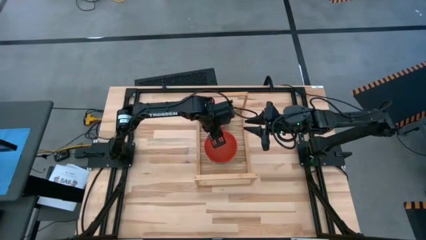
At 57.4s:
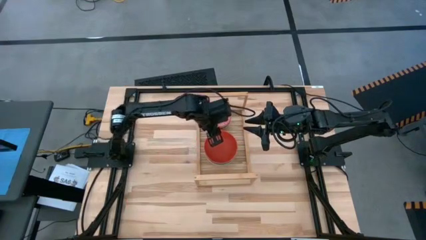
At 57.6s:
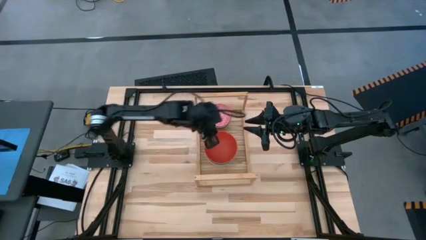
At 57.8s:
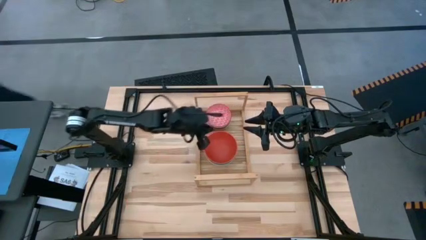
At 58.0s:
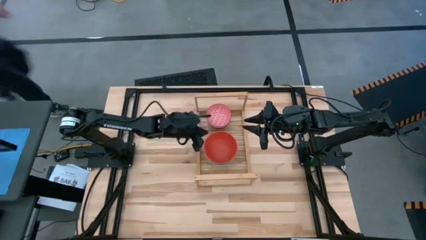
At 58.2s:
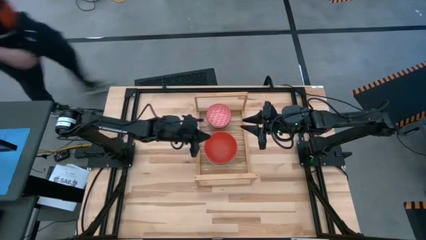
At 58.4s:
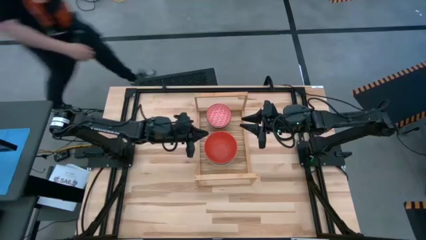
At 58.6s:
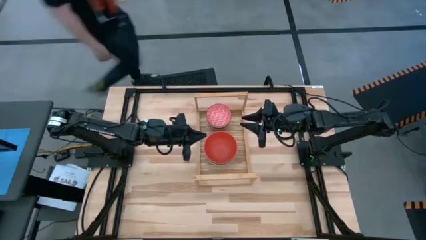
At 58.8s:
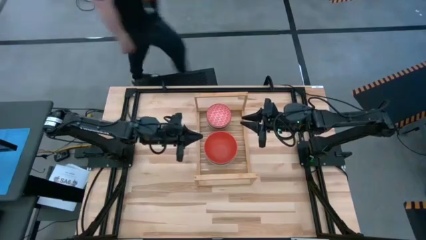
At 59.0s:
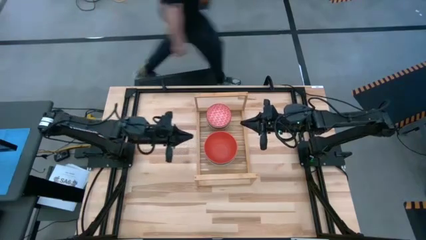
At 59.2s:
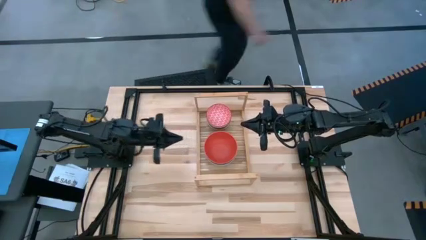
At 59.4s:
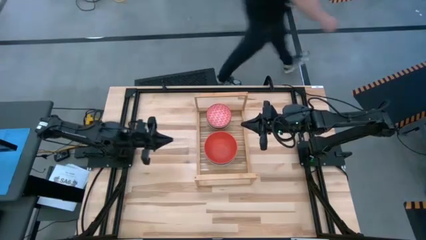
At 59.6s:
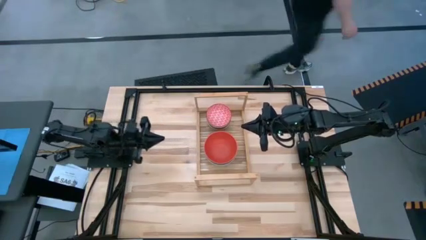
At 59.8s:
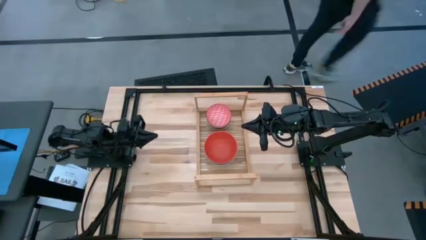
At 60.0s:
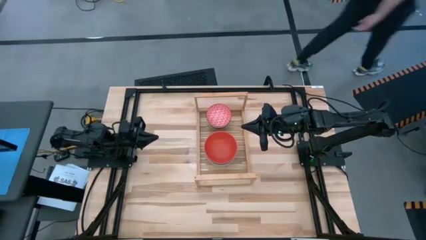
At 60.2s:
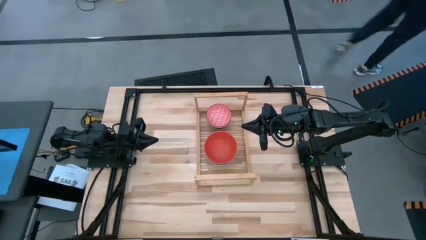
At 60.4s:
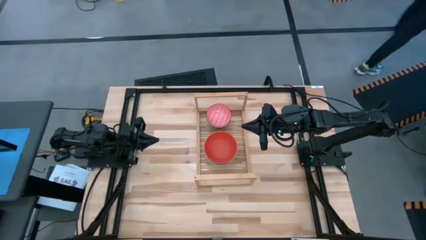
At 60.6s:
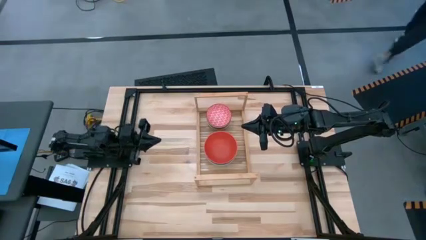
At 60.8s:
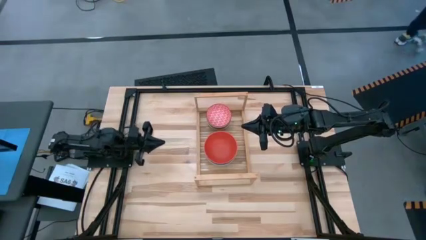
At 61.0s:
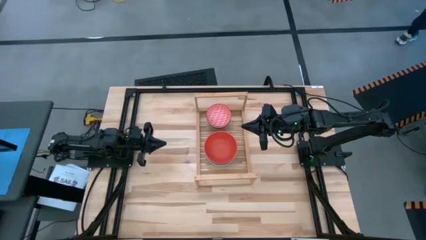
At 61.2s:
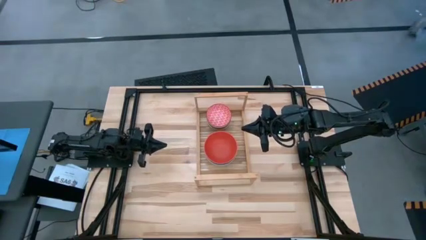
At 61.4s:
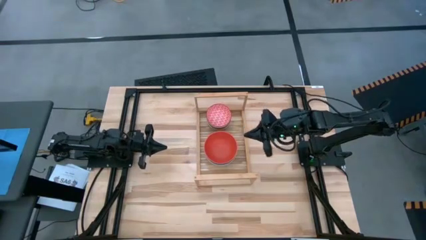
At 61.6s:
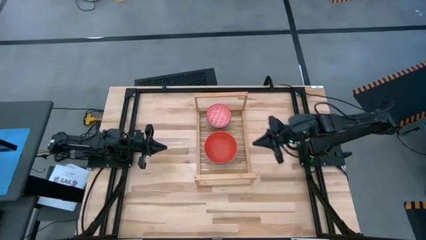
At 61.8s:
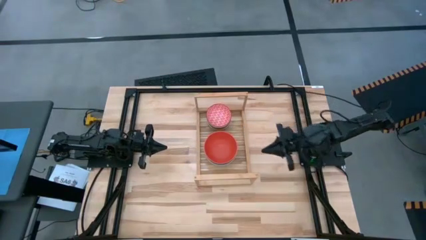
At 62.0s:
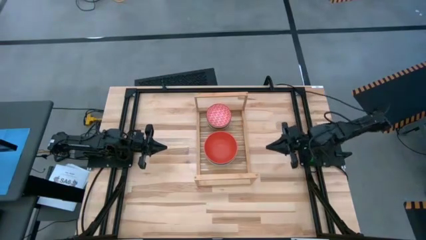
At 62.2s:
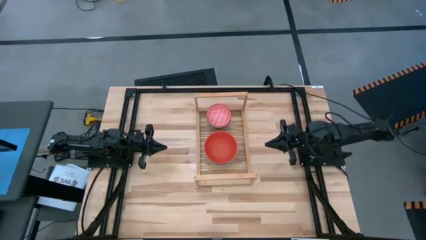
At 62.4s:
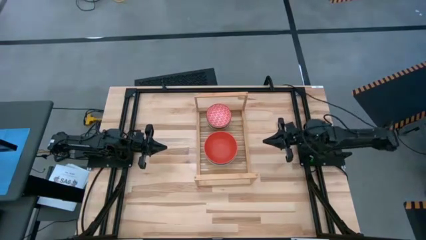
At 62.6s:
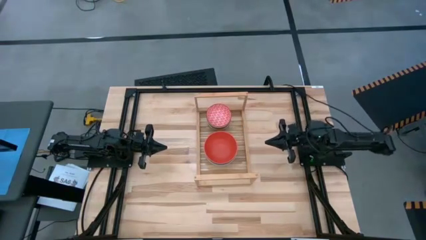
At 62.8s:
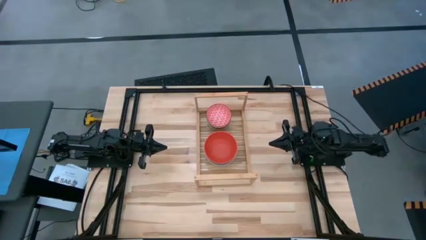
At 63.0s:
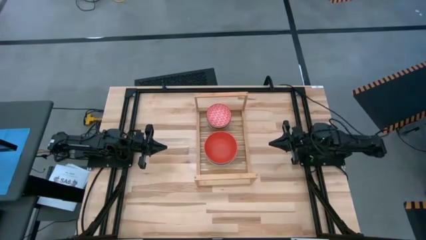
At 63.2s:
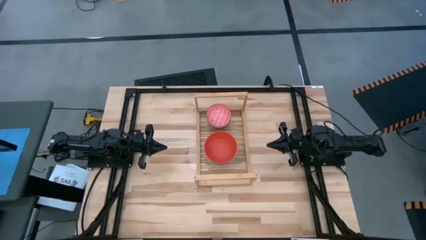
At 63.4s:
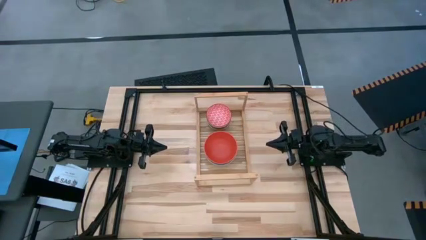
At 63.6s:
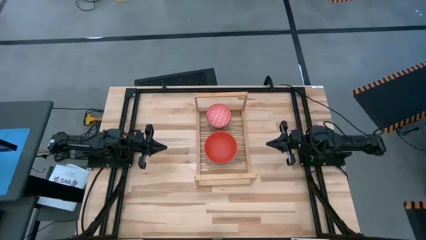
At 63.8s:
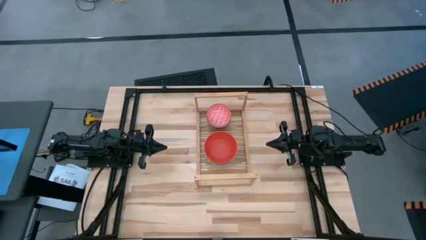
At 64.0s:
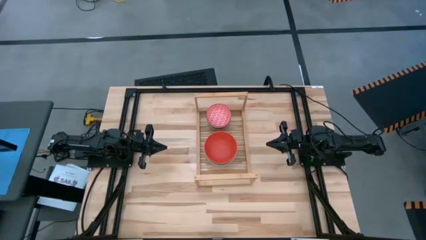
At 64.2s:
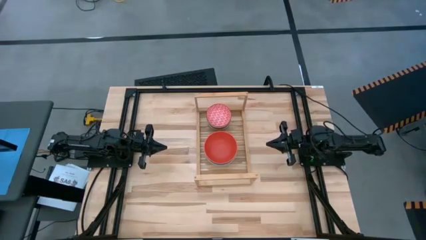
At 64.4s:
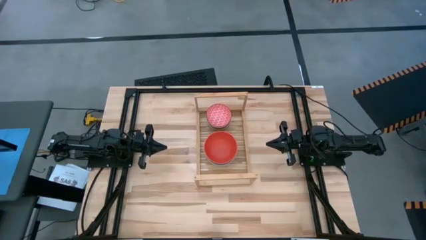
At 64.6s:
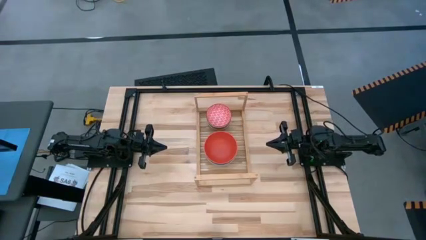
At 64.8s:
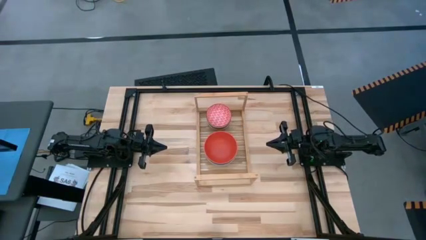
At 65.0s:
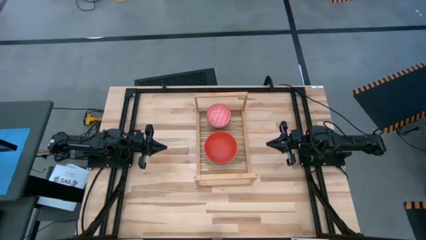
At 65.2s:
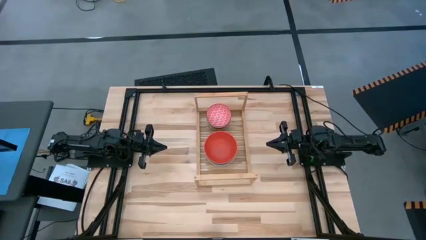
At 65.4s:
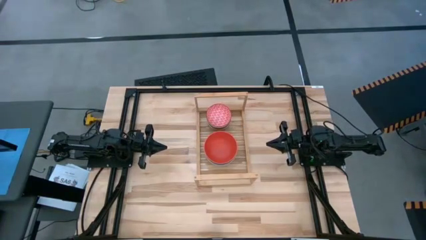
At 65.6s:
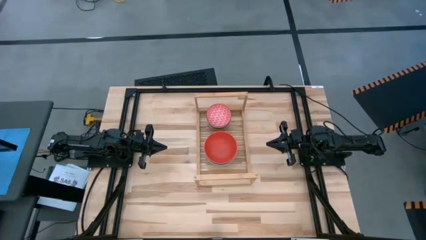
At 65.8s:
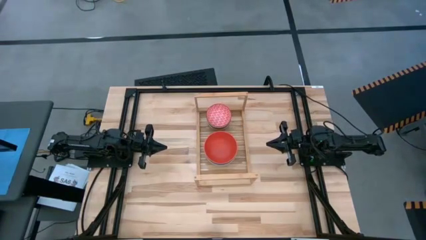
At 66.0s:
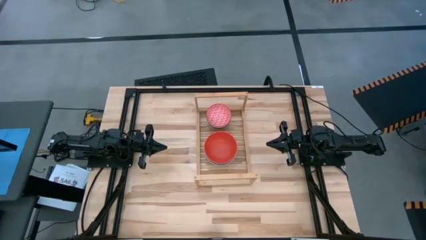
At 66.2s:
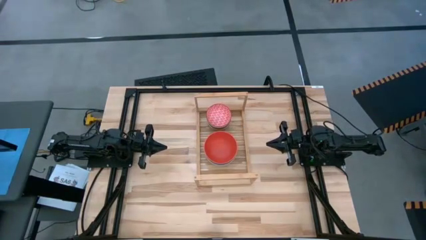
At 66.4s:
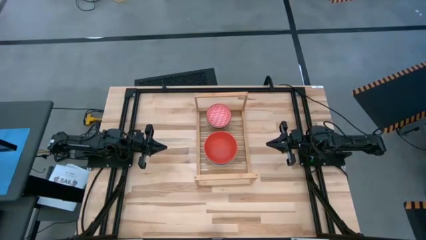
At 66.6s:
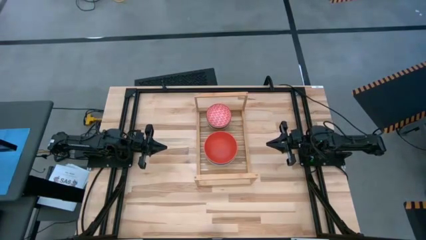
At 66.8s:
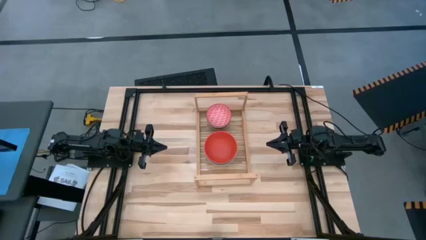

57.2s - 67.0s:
Task: Place and stack bowls onto a shelf
Return to Home Position

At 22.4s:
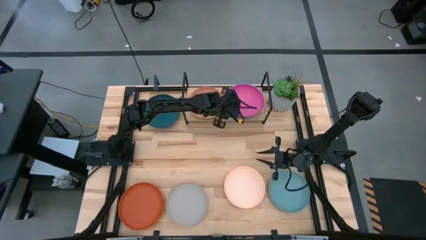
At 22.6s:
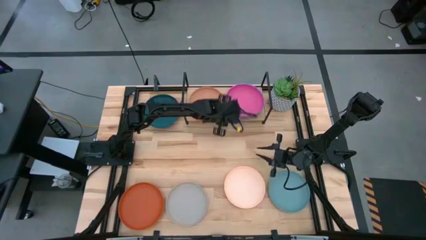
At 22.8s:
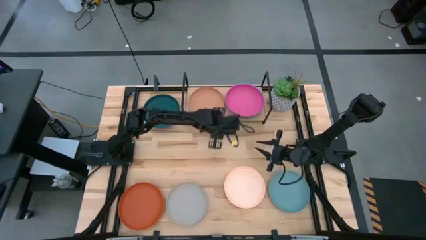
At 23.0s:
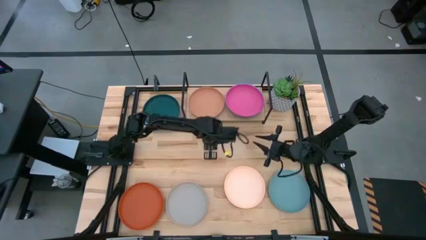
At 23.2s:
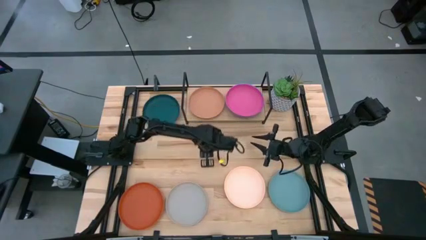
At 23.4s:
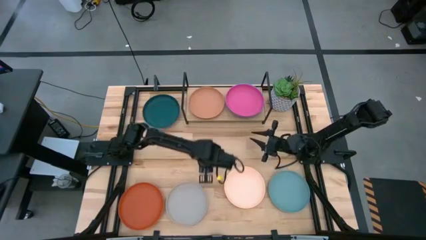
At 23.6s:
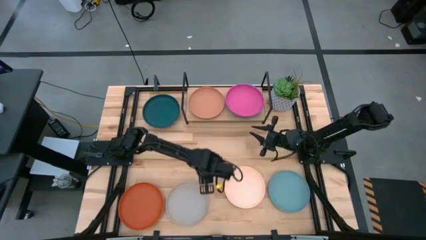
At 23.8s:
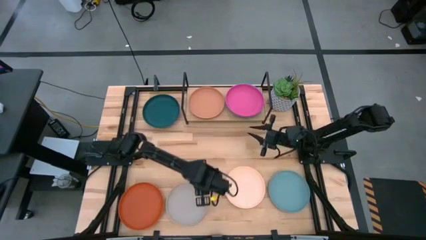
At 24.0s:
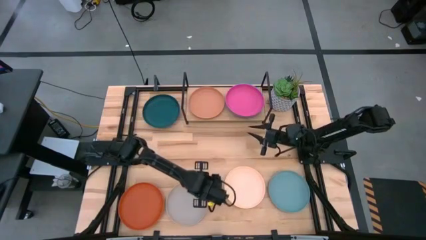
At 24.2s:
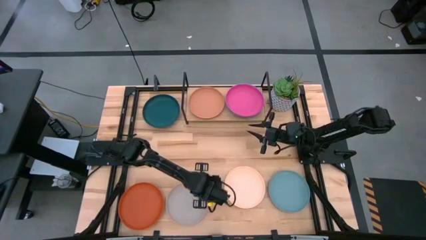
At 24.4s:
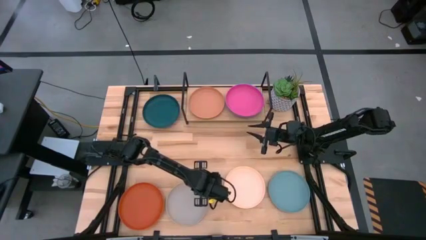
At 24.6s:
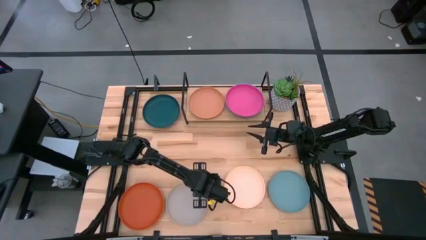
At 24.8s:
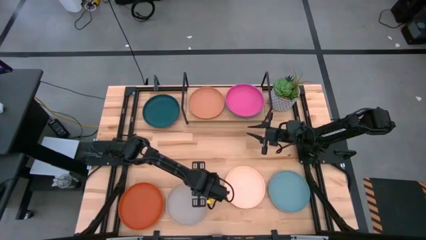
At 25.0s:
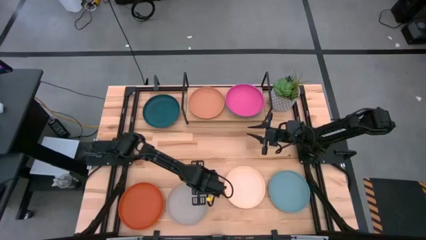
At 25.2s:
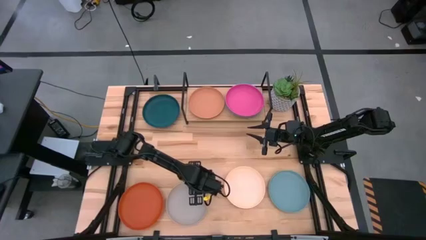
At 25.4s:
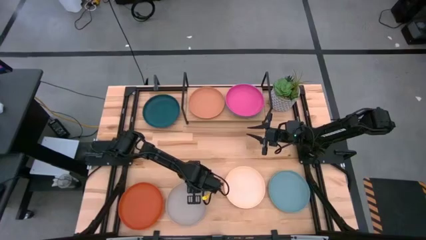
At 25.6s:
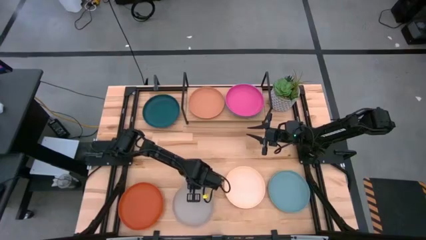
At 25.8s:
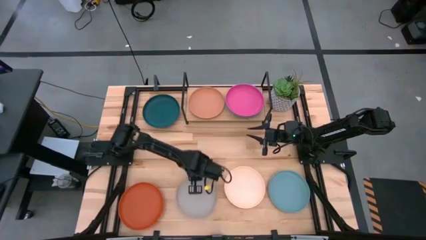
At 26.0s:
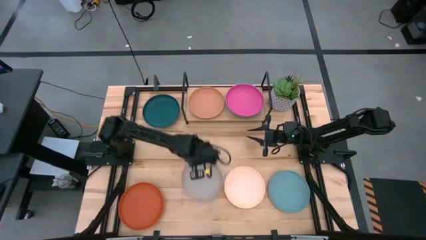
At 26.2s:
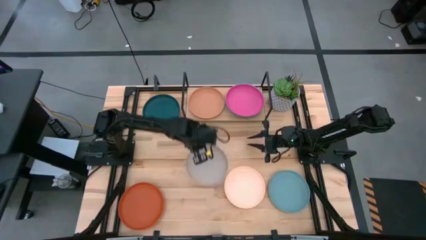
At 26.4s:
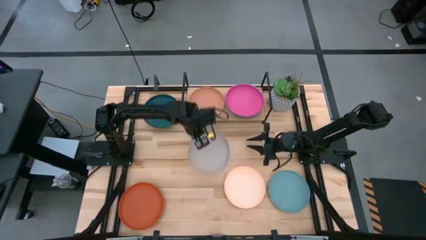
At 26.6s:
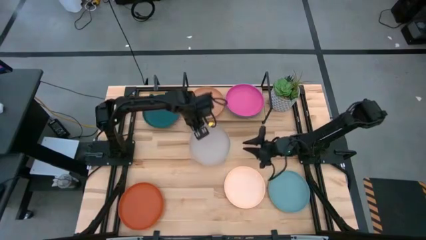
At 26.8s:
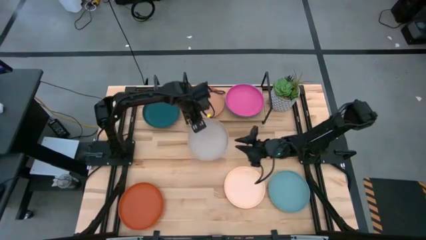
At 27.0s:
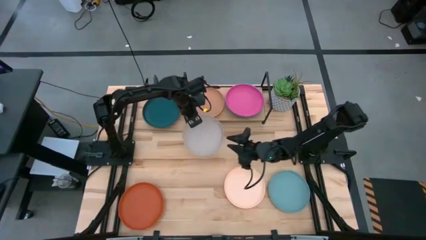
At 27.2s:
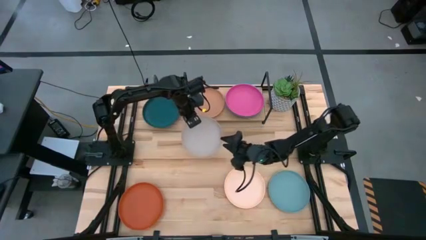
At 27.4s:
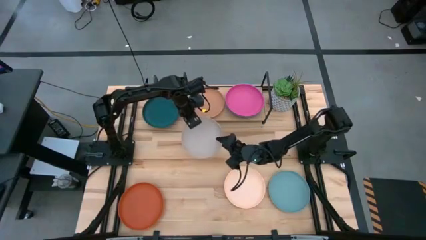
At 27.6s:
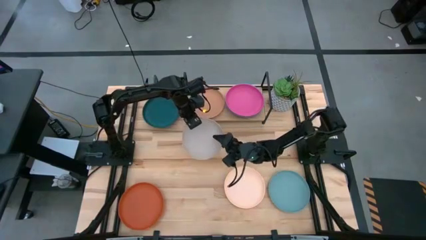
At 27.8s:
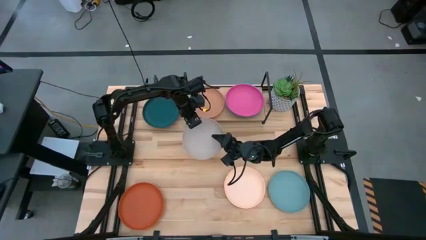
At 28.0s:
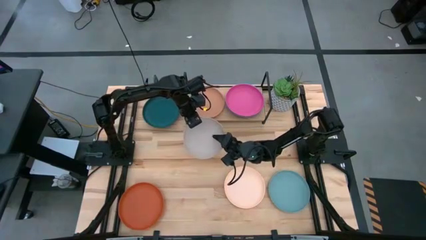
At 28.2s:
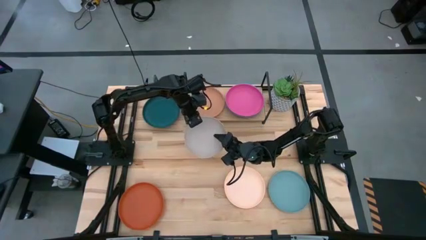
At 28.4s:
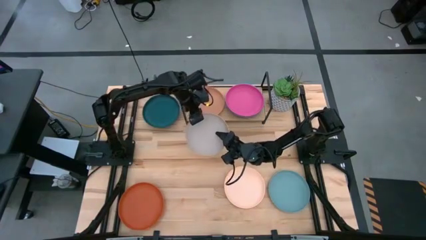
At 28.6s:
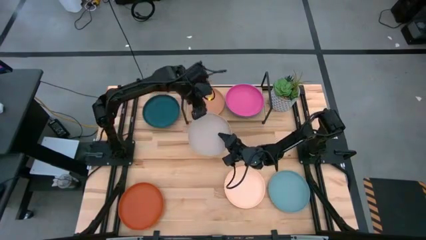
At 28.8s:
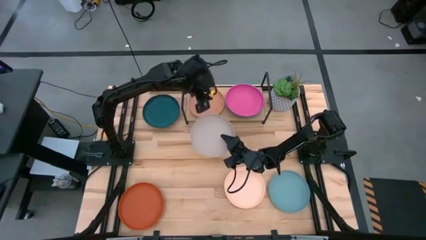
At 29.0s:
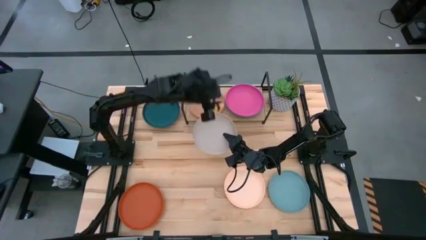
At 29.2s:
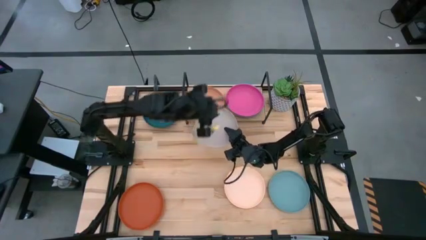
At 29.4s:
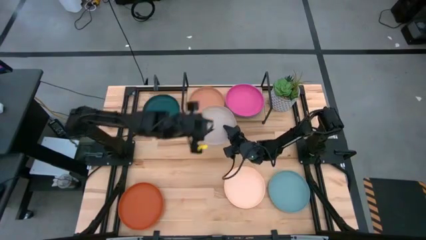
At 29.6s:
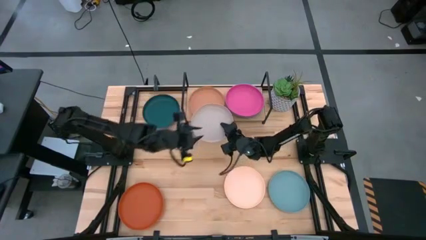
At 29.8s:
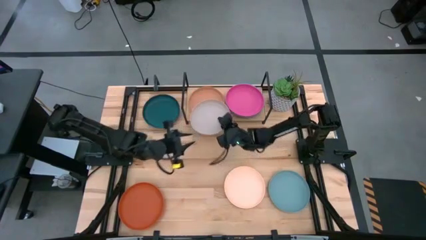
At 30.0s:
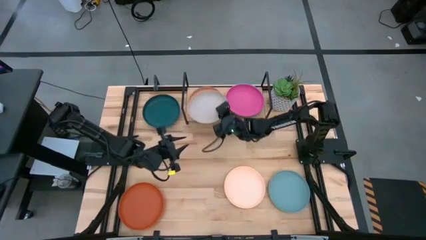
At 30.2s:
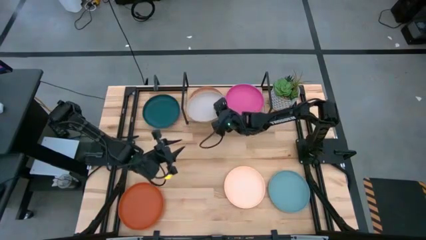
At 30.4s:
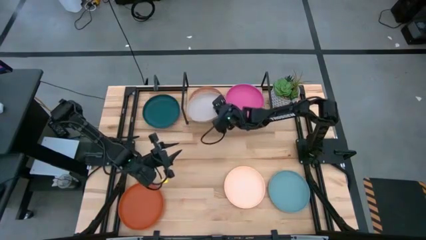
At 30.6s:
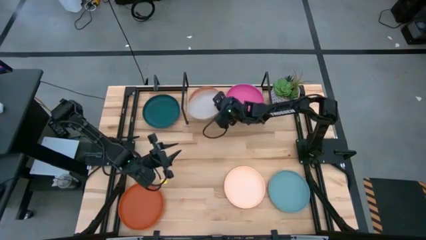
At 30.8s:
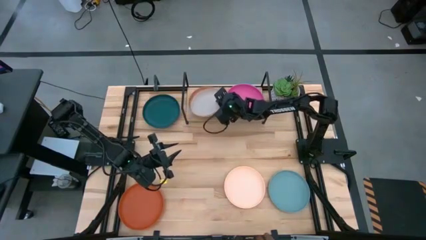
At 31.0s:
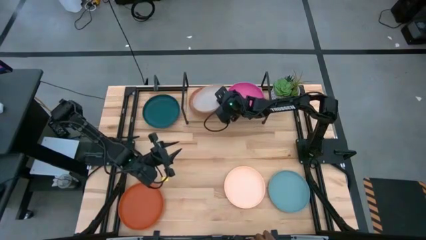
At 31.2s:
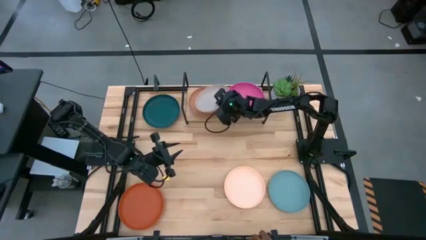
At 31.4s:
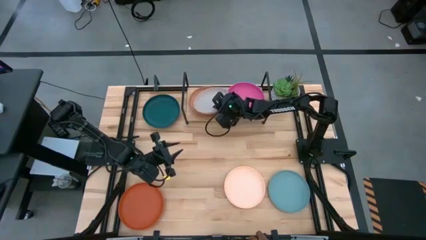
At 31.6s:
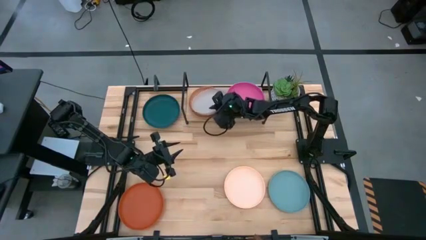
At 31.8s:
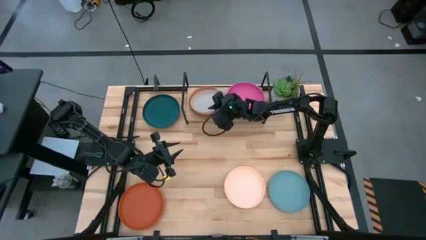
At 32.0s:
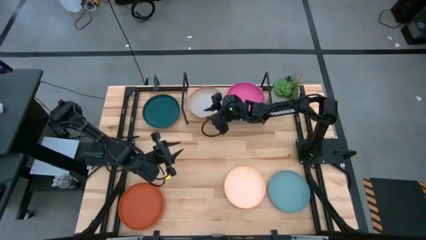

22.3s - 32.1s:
Task: Place and stack plates onto a shelf
Stack the gray plate on top of the brown plate on the shelf
